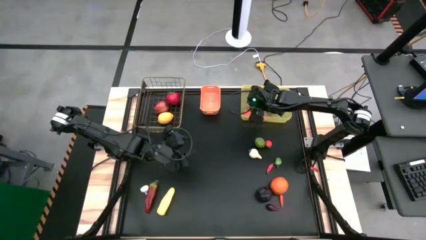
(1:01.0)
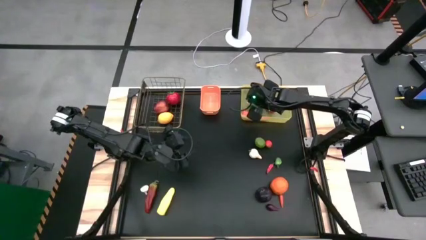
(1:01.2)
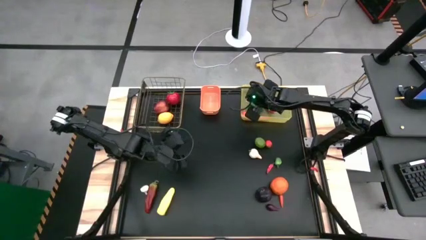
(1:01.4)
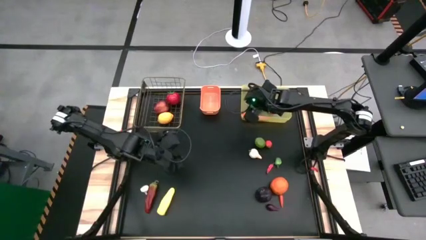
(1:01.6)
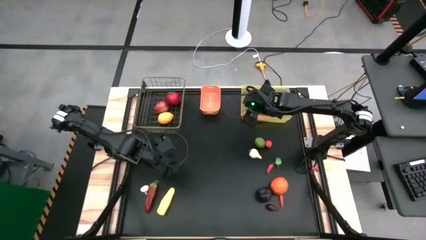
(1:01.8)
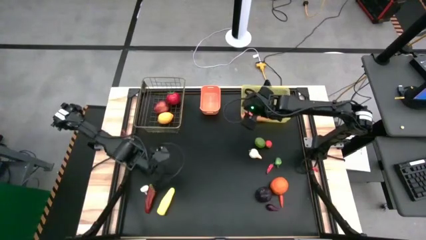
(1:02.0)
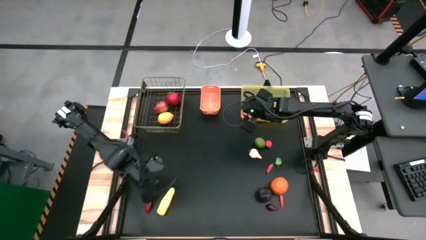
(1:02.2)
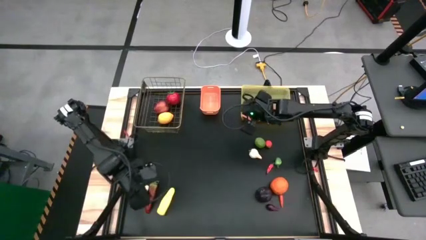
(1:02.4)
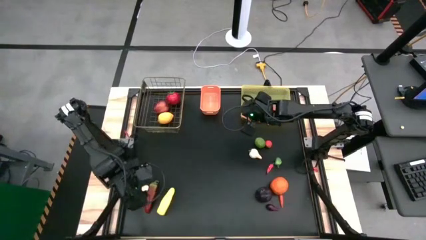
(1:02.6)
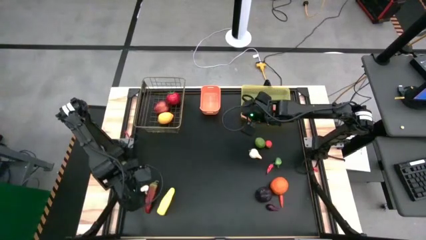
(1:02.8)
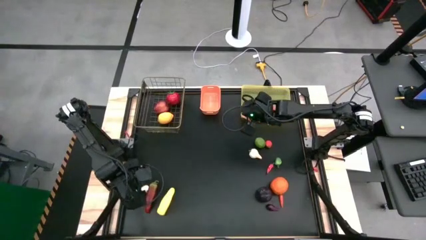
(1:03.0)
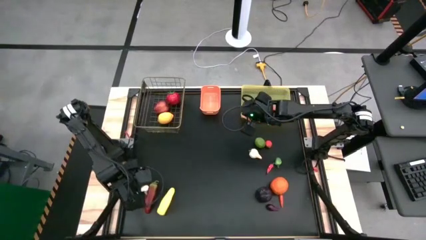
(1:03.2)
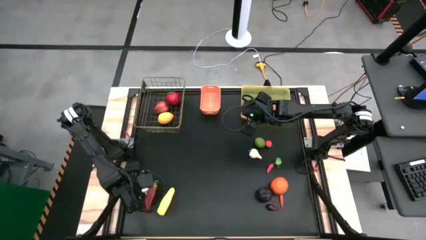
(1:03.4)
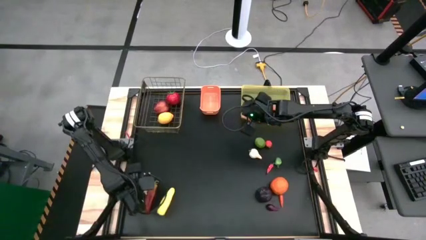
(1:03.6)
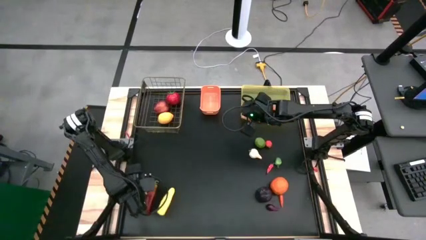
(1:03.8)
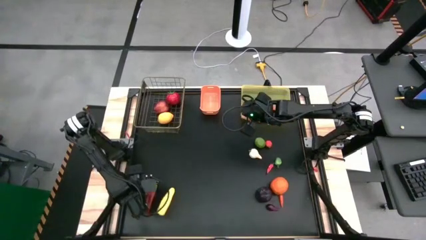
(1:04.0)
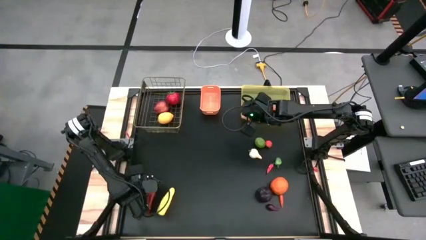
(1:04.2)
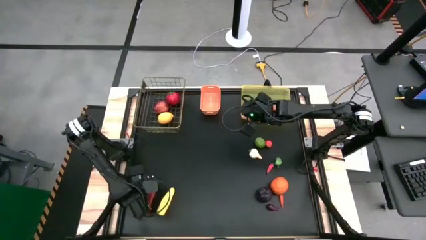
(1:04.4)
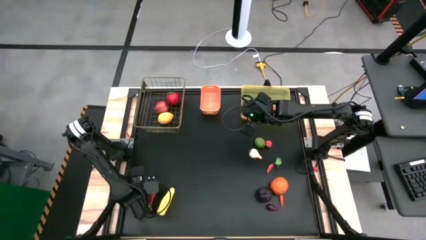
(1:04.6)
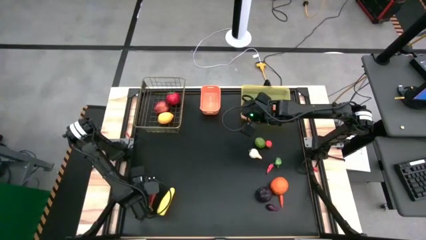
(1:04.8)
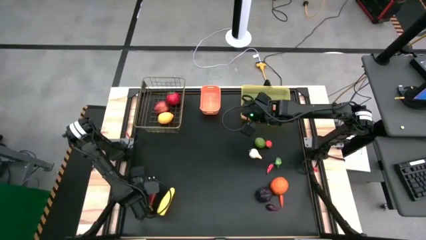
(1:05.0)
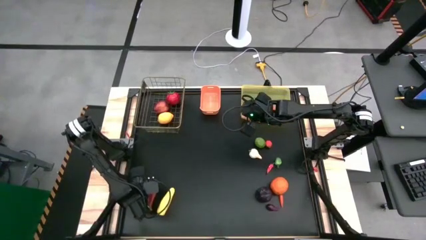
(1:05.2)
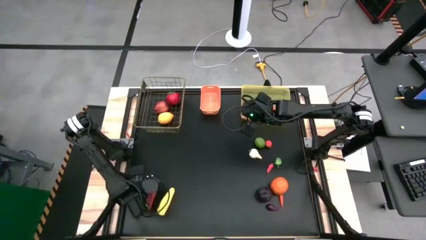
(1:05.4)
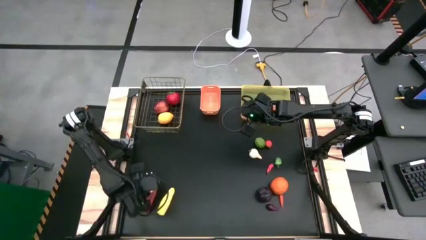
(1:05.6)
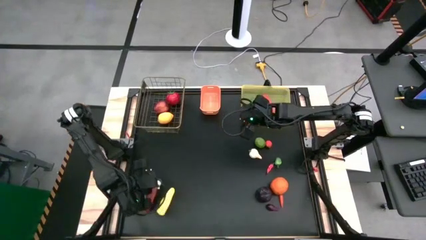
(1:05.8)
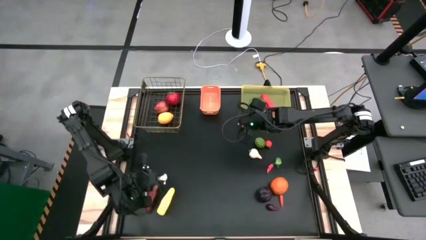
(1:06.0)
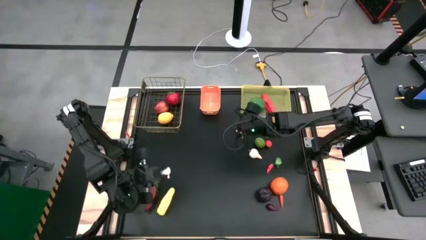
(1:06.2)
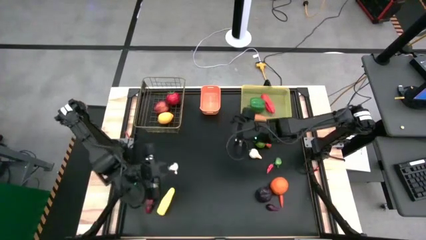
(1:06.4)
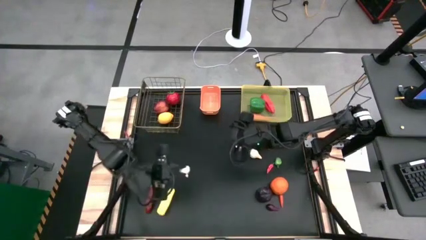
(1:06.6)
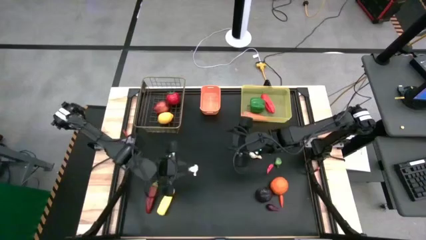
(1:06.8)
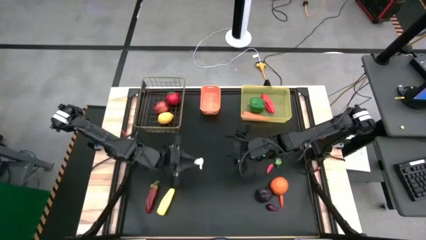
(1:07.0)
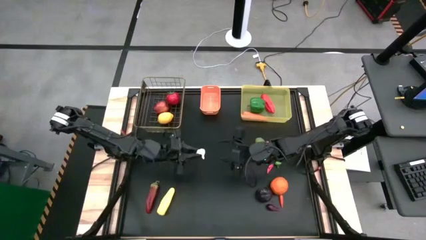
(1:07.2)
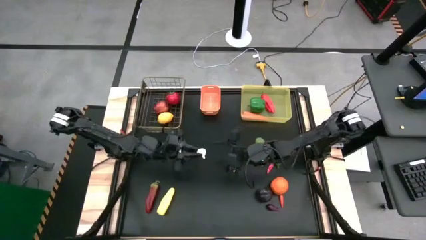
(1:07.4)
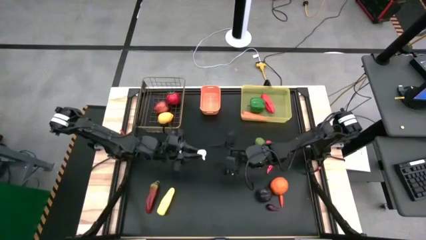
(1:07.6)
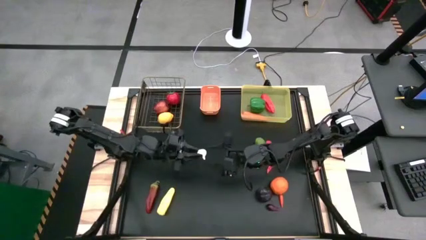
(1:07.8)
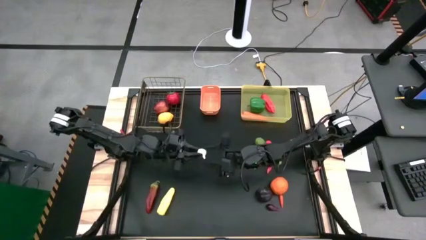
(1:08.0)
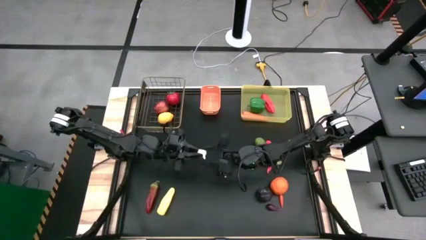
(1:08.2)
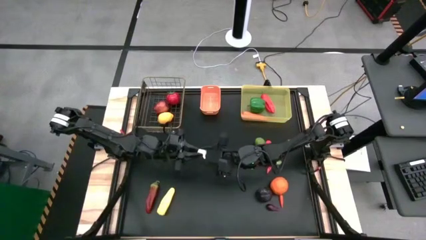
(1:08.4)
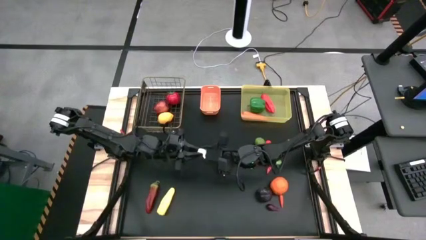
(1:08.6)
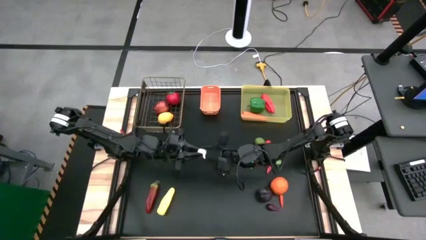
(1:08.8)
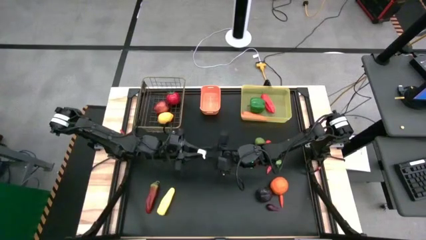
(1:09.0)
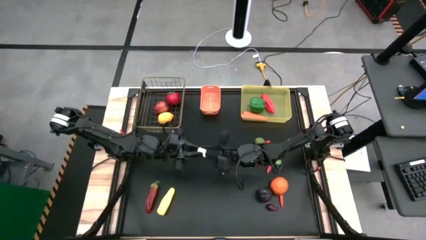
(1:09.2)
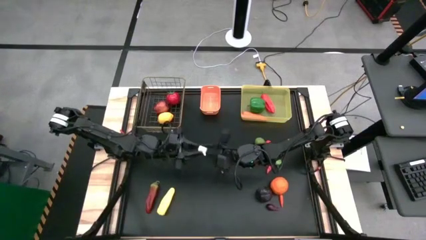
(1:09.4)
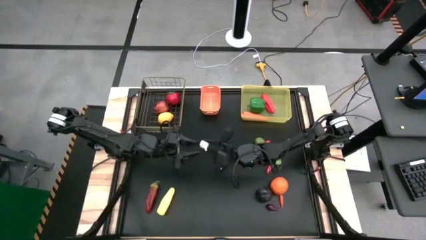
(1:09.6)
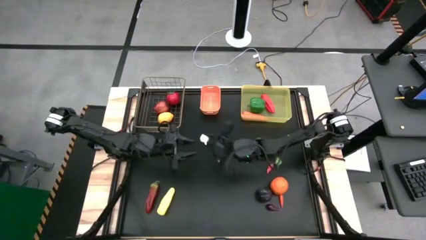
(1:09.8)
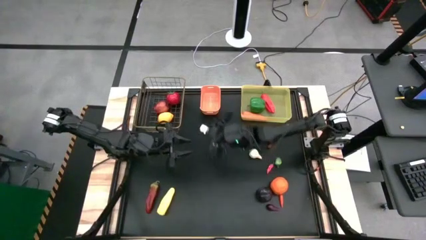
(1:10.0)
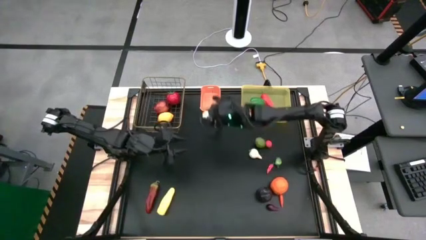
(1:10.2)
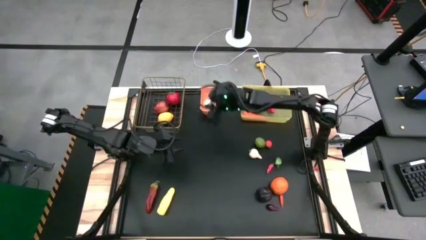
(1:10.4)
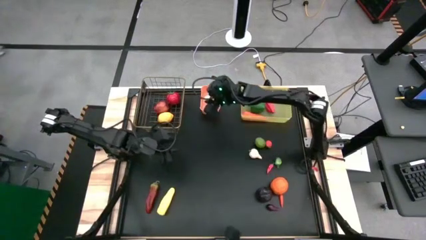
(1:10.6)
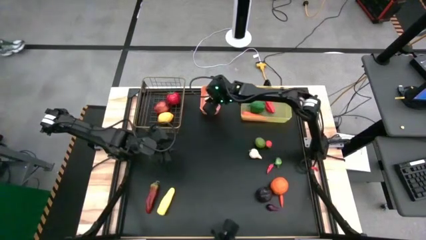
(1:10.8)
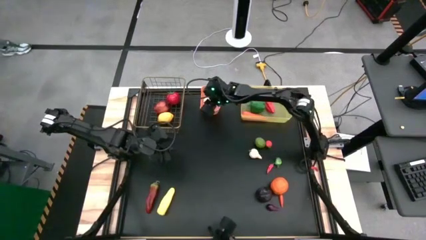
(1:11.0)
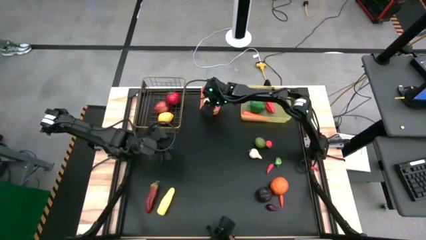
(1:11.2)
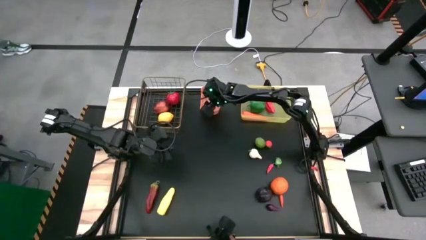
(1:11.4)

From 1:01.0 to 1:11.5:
Task: Sort produce into baskets
Put the left white garlic into the orange bin

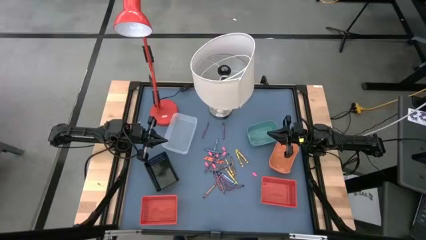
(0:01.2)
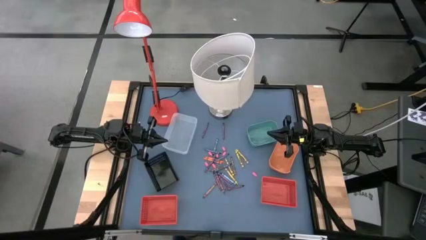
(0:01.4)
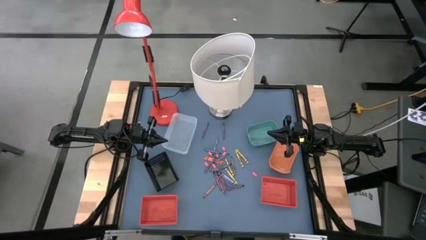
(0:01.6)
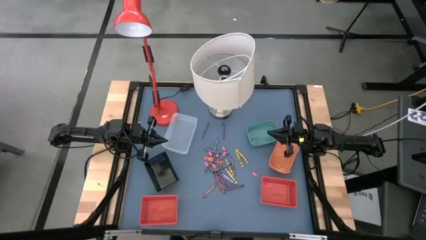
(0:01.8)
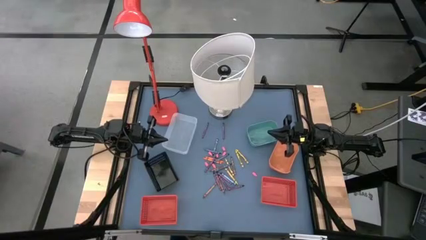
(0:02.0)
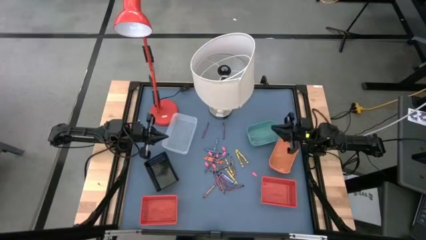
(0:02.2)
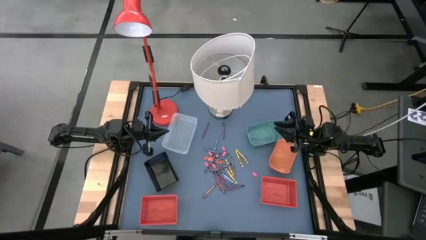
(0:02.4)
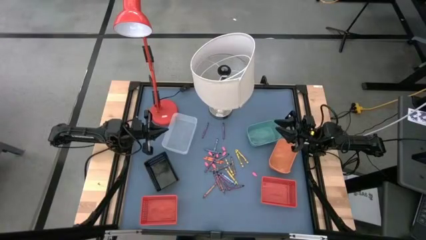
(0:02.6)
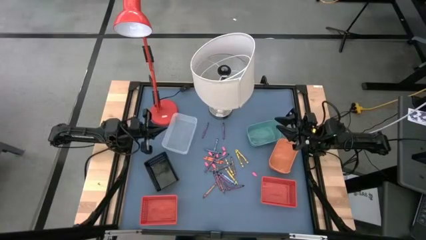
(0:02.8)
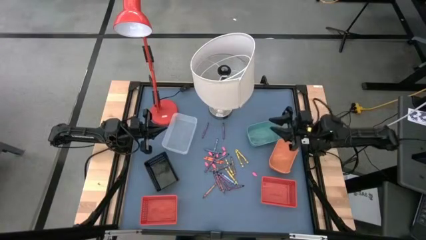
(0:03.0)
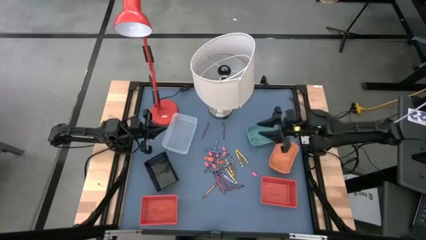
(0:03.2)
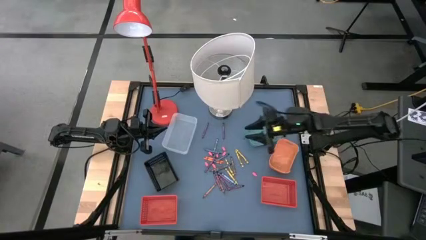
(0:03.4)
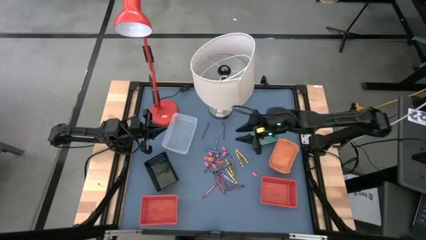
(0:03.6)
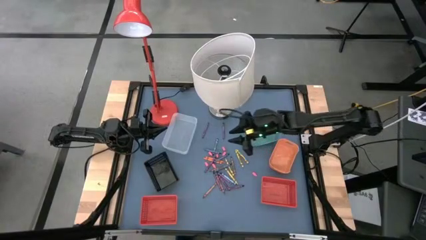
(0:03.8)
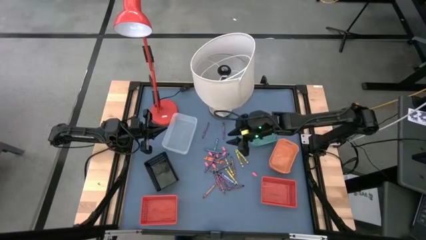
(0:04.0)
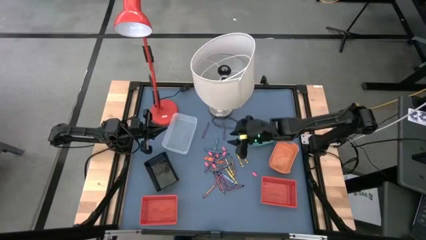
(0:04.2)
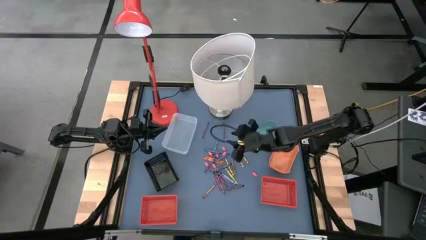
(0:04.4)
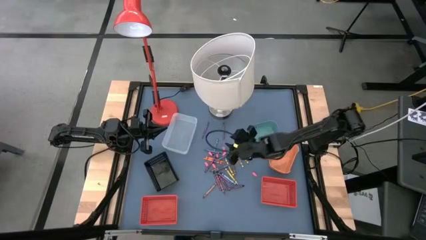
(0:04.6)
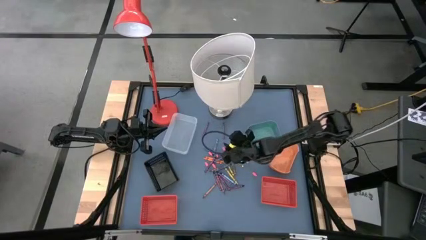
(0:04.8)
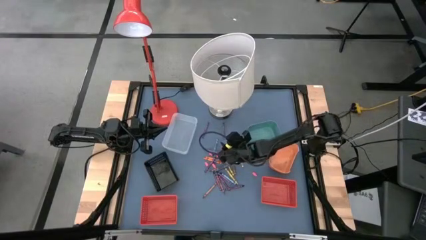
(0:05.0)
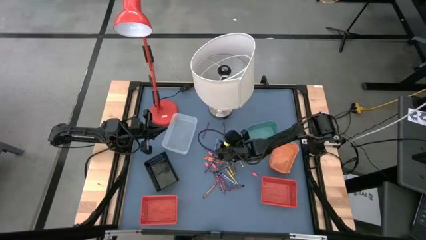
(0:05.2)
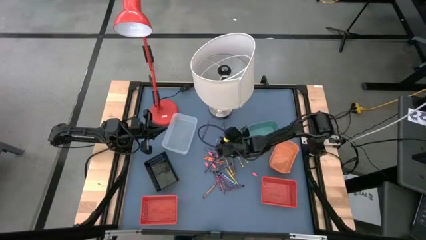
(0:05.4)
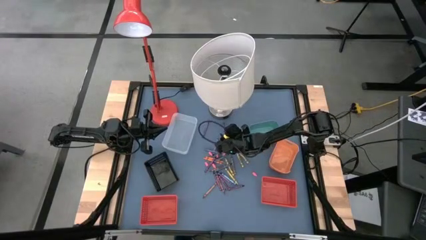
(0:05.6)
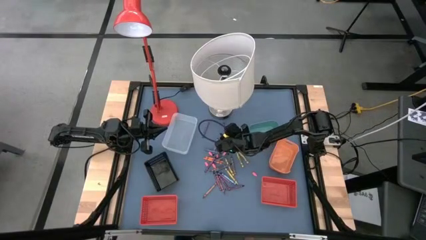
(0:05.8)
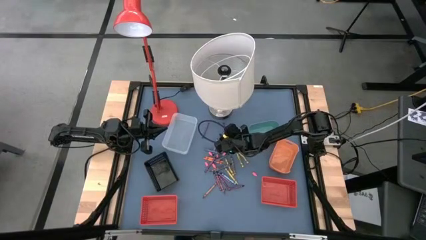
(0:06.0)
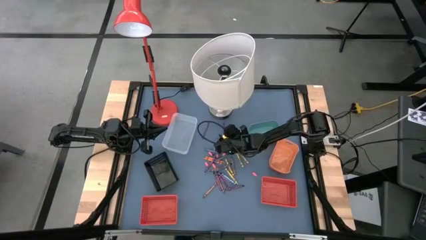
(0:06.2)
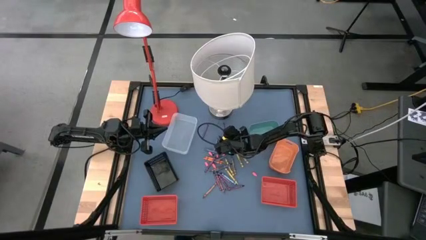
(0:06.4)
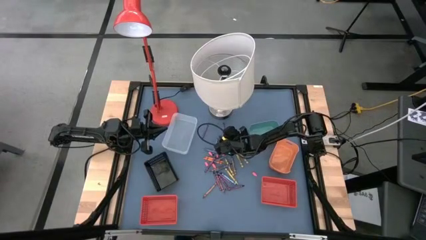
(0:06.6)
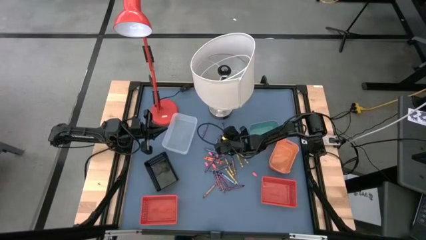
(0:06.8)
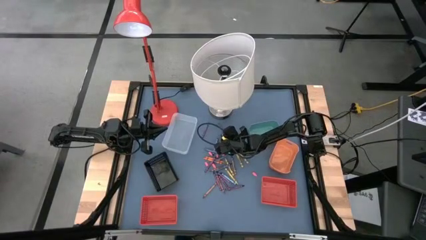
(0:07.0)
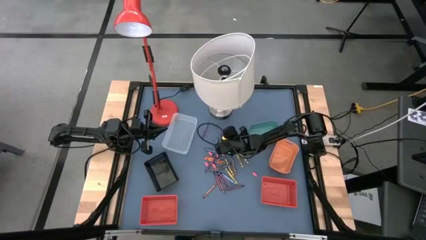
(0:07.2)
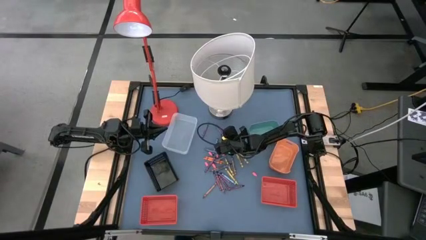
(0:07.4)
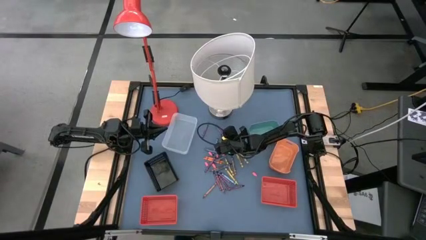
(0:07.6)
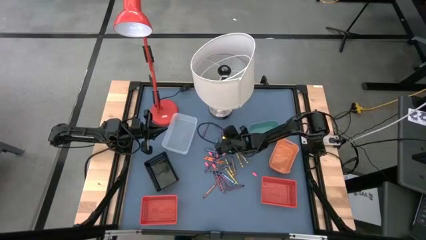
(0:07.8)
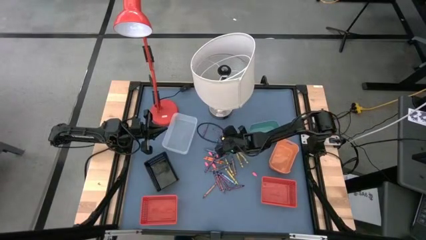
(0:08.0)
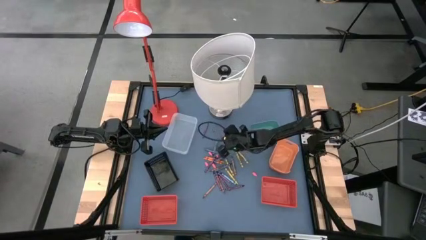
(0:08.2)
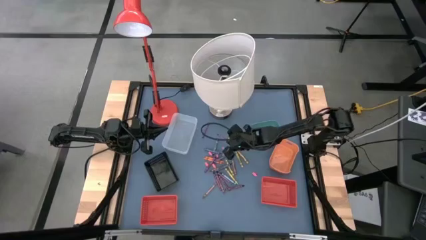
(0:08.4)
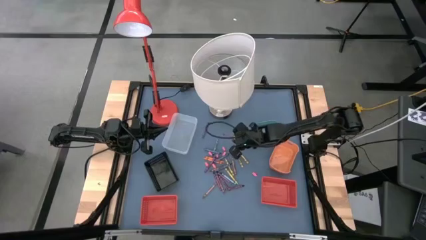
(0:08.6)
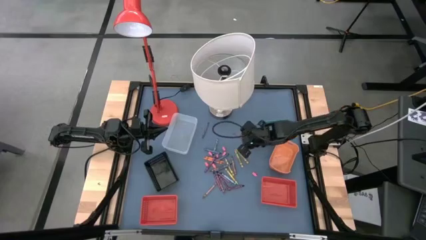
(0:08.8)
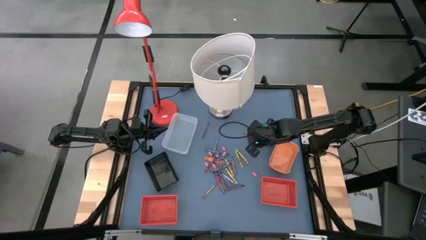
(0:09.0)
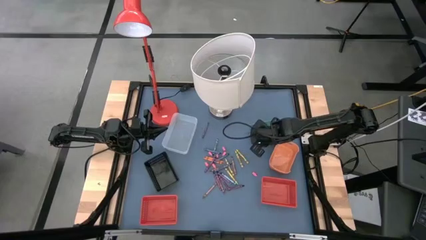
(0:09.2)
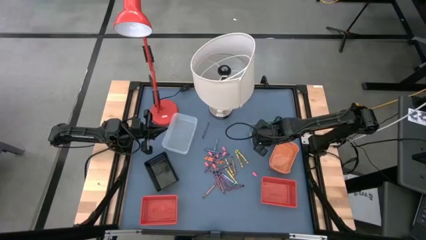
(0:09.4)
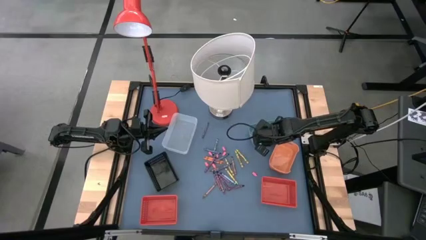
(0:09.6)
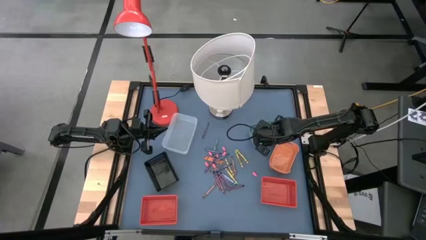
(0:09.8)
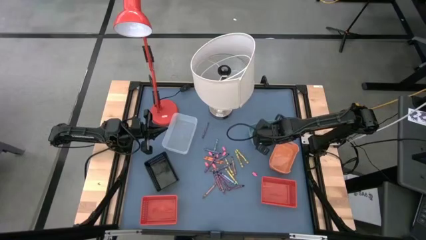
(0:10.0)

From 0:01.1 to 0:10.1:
Task: Sort crayons
Put the violet crayon into the green bin
